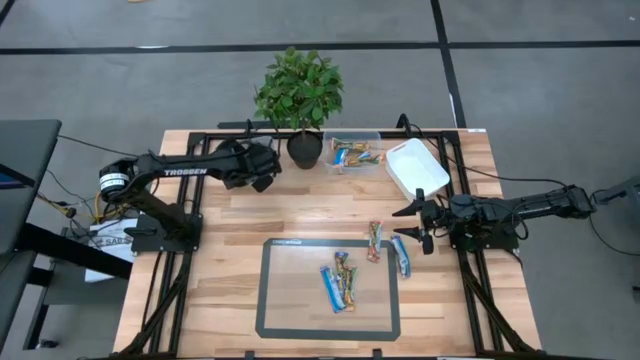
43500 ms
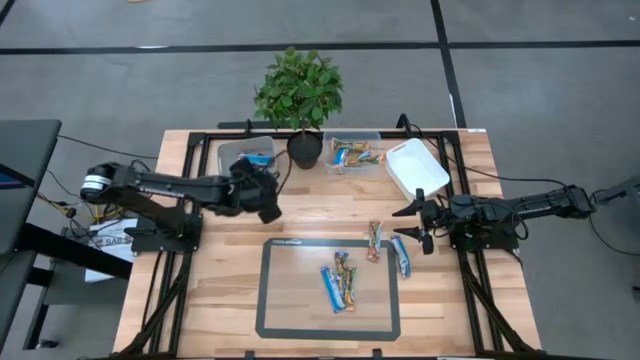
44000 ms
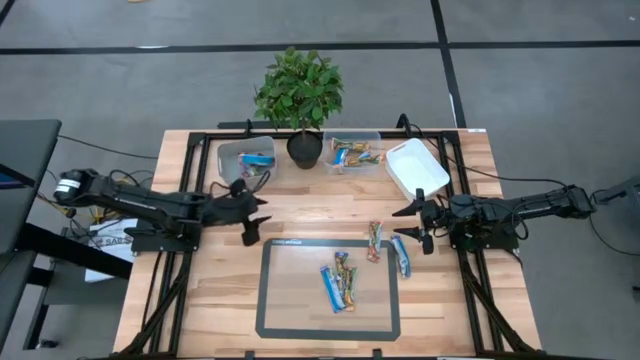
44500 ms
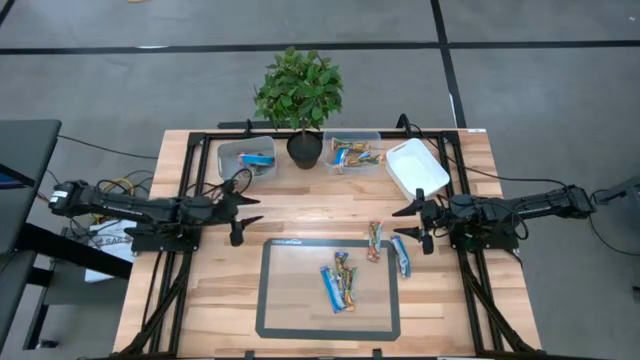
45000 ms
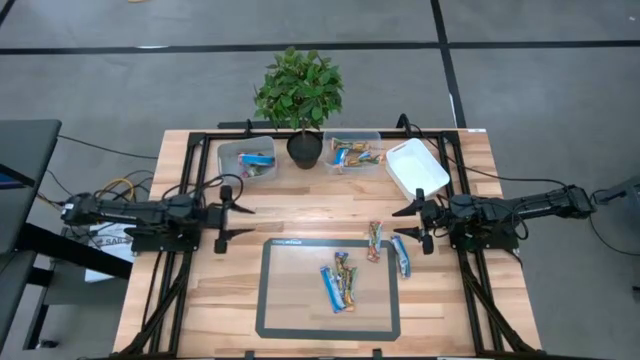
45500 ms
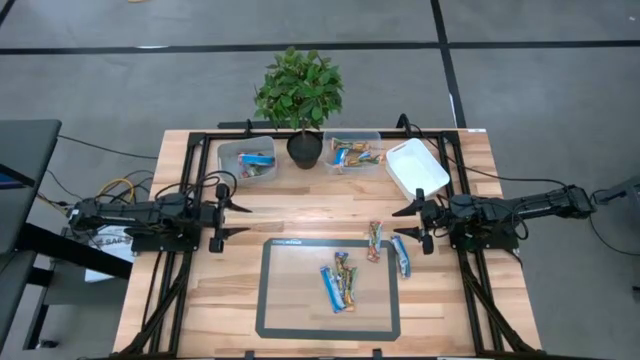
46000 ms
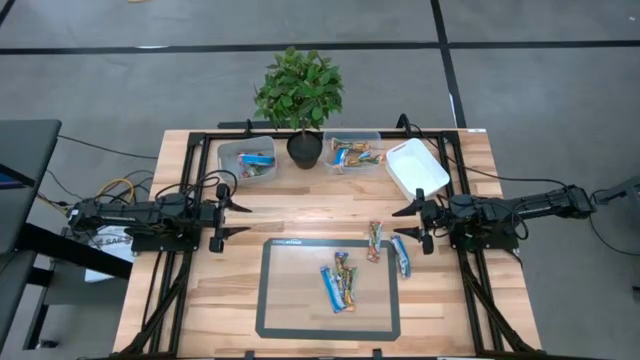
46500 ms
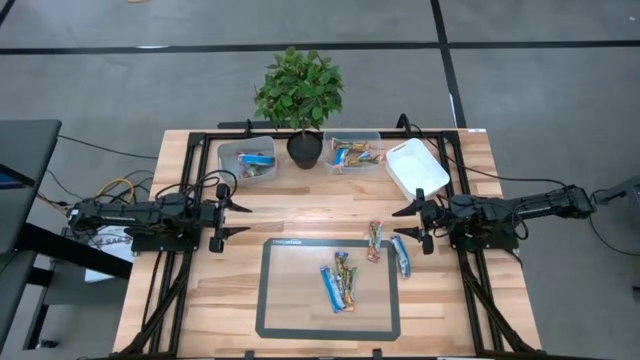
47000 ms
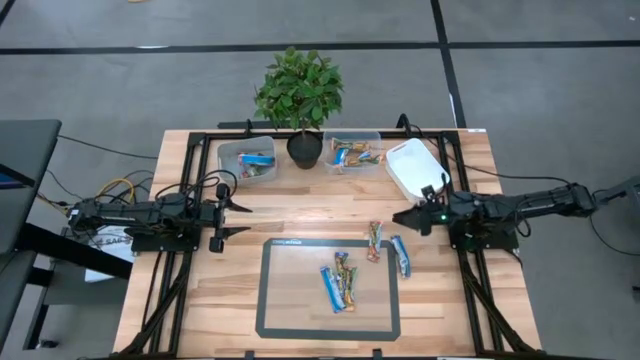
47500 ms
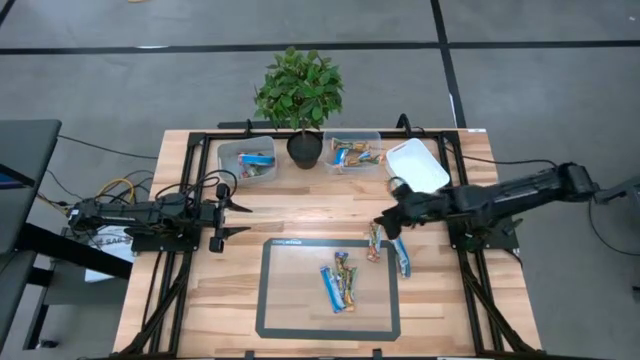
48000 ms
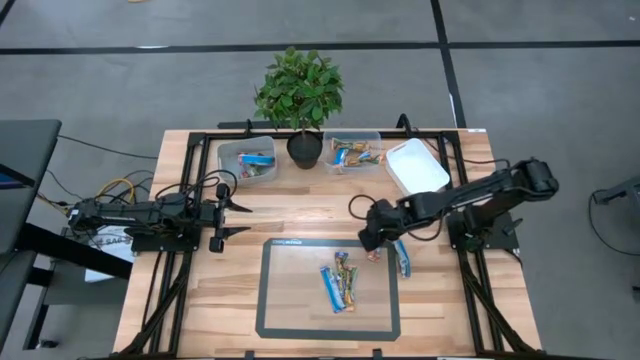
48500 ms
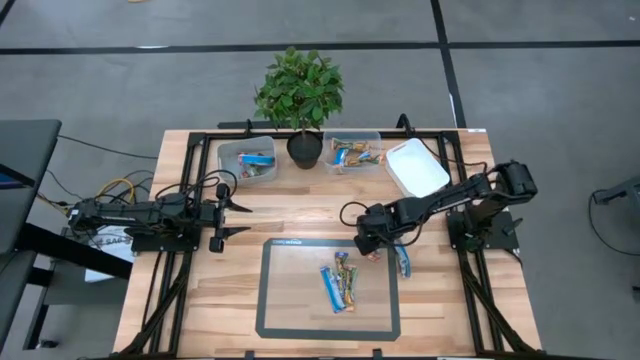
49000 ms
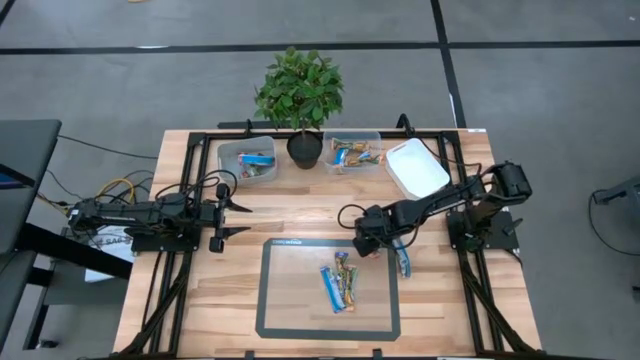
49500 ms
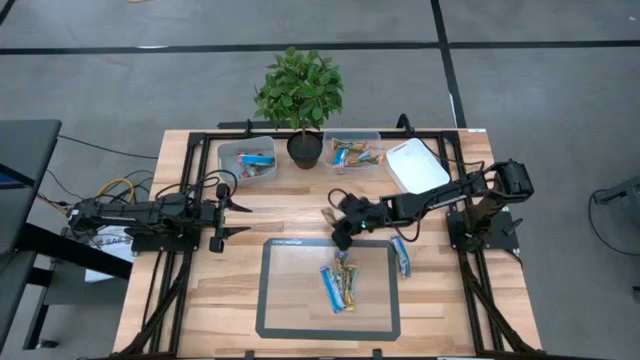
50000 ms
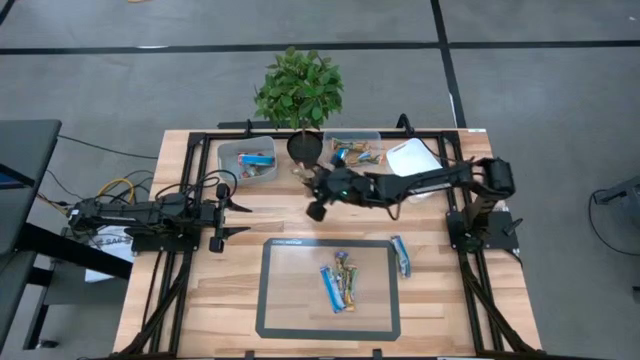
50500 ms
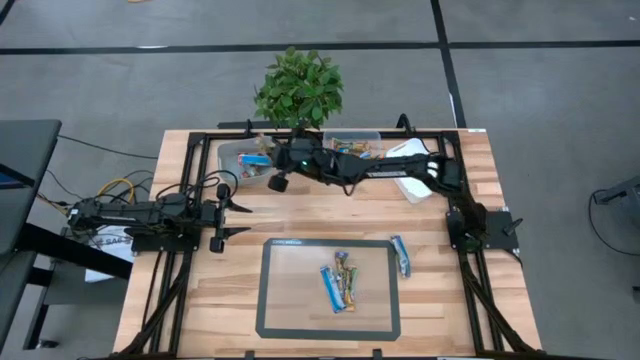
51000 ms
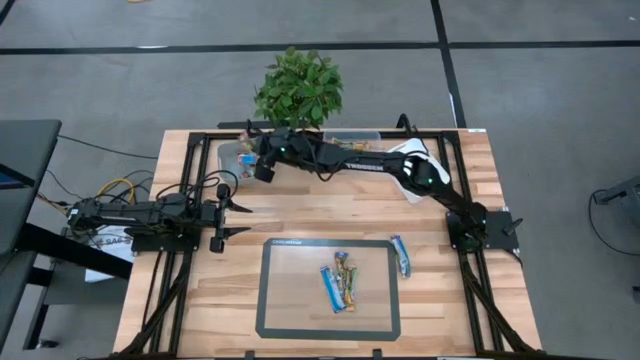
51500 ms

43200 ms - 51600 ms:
Task: Pick and place Granola Bars by type
Put the red granola bar into the gray bin

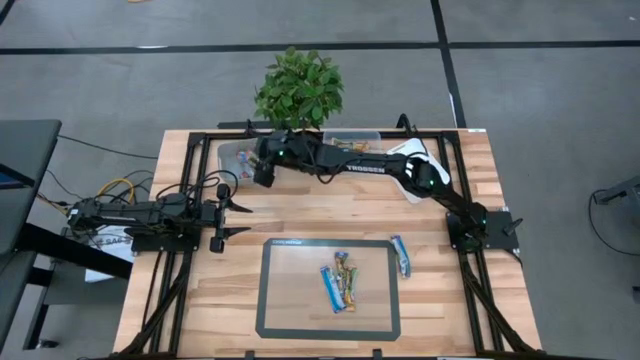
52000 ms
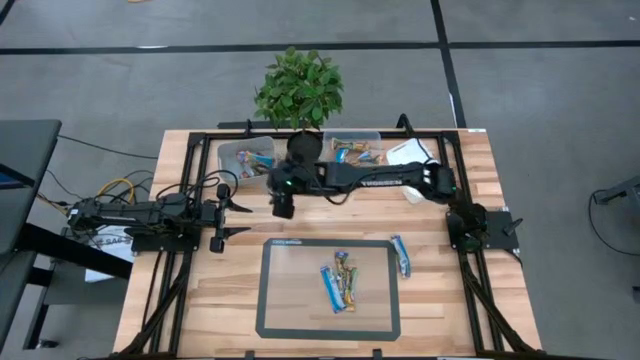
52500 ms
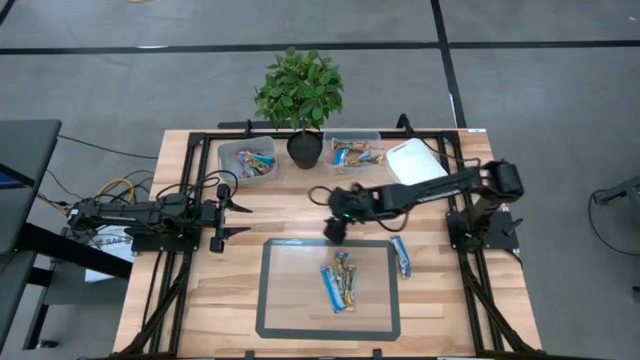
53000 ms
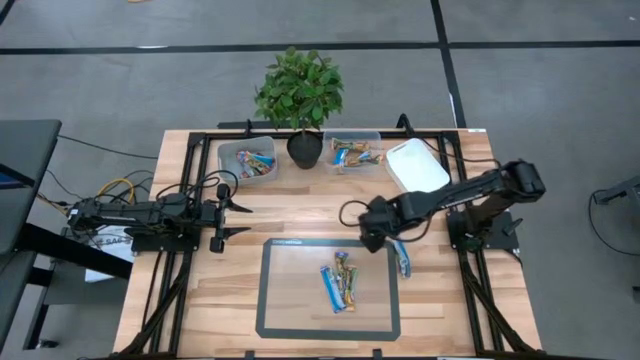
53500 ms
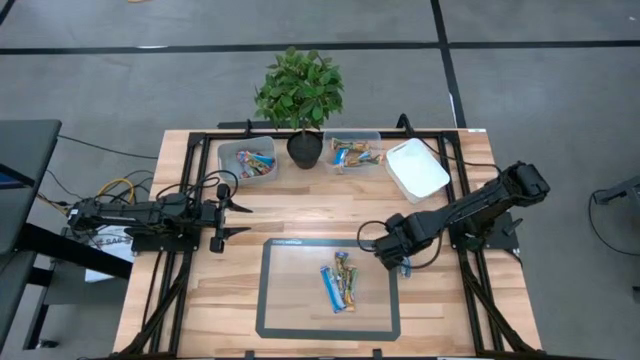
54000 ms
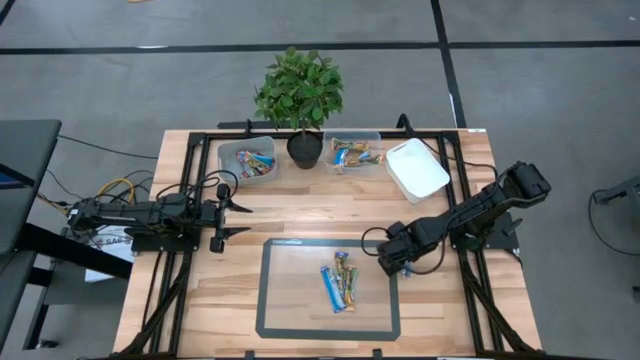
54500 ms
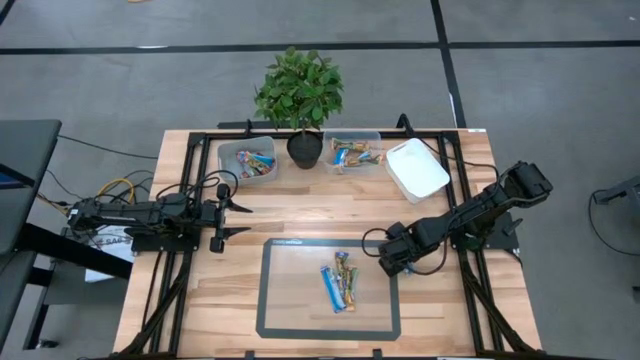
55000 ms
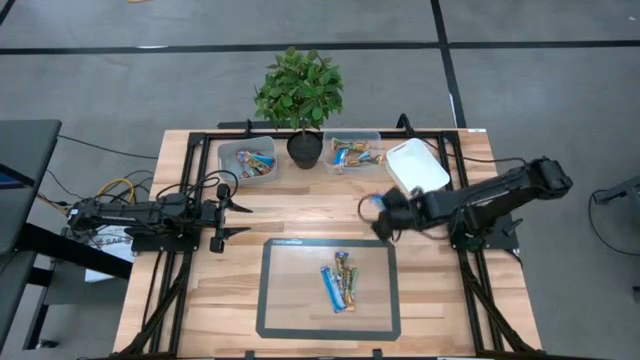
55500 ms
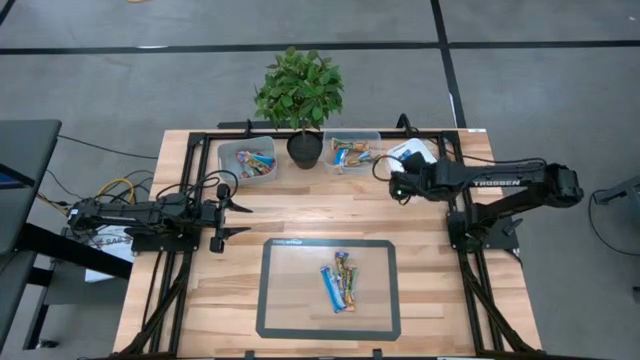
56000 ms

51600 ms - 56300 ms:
Put the blue granola bar into the white bin

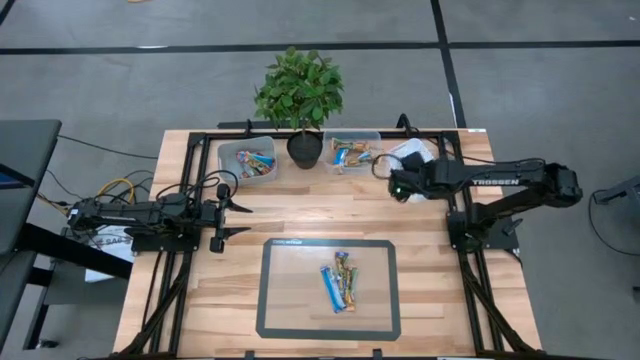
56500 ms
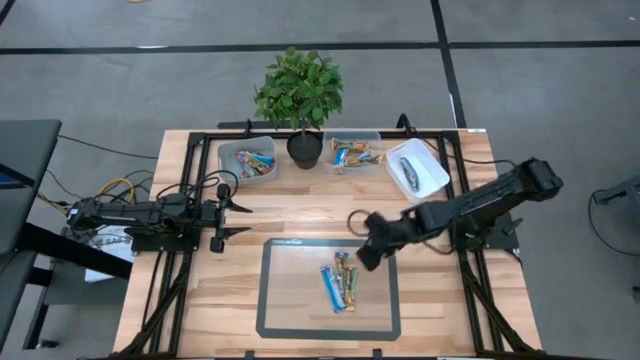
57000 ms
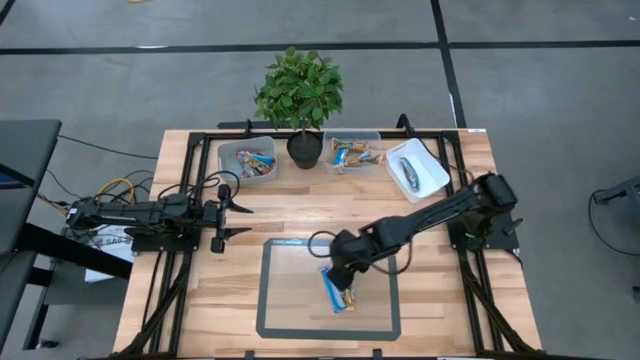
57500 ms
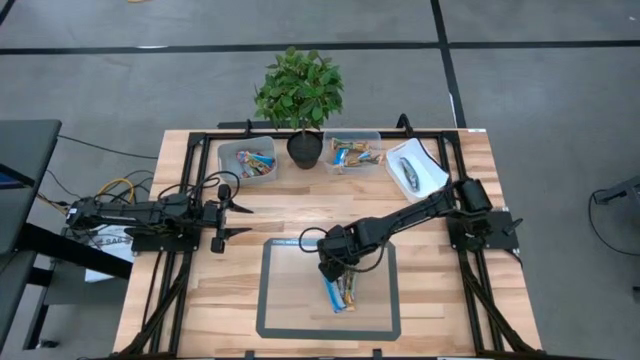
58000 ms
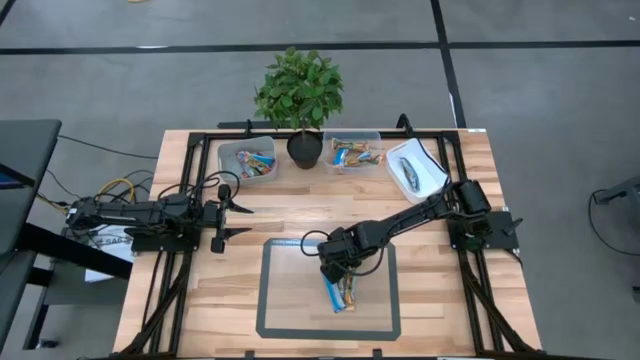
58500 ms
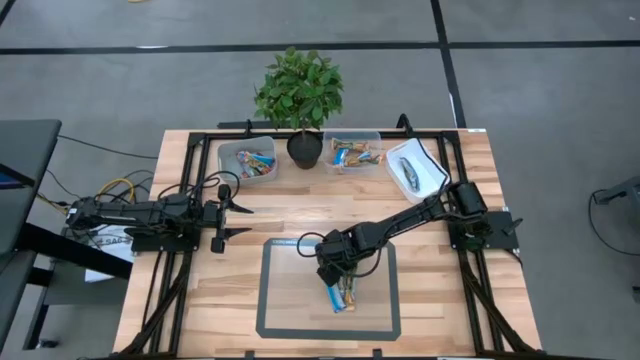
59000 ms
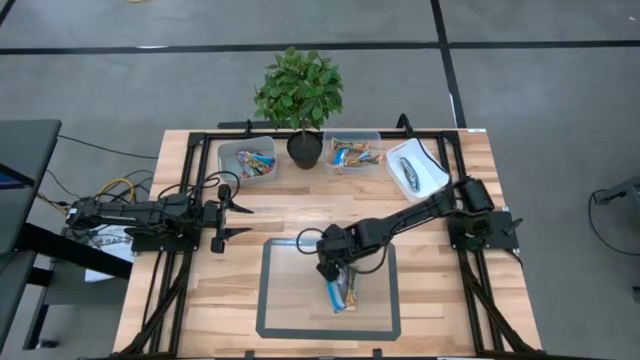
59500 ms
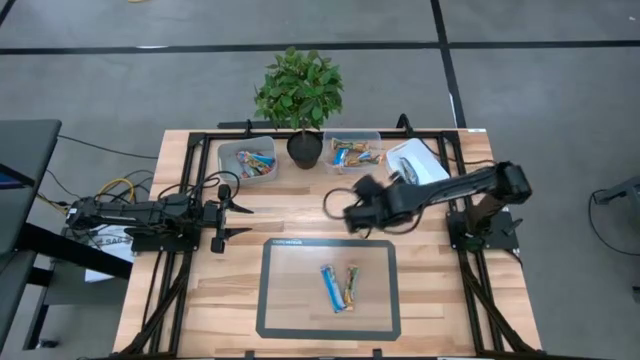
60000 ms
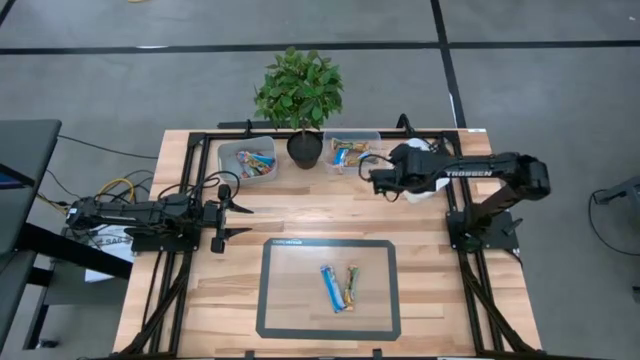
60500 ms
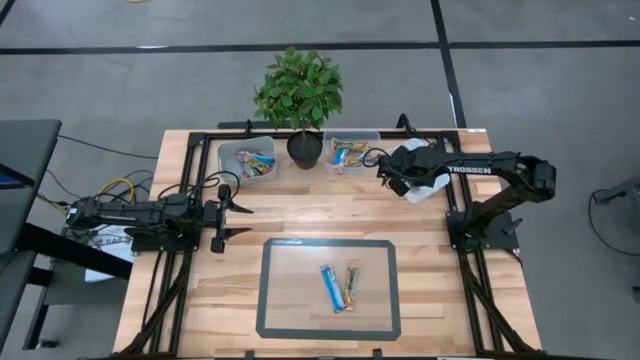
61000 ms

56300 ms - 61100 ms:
Put the blue granola bar into the white bin

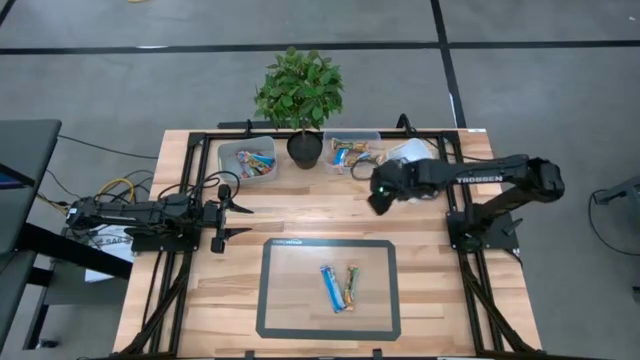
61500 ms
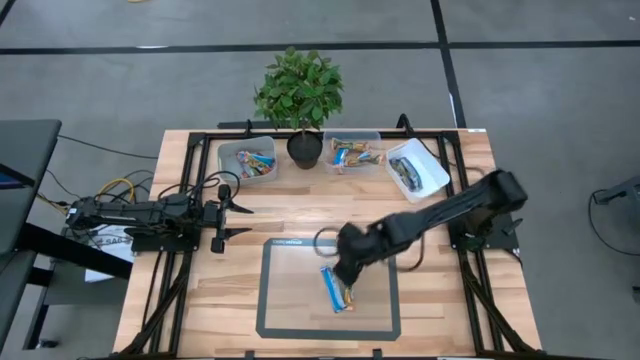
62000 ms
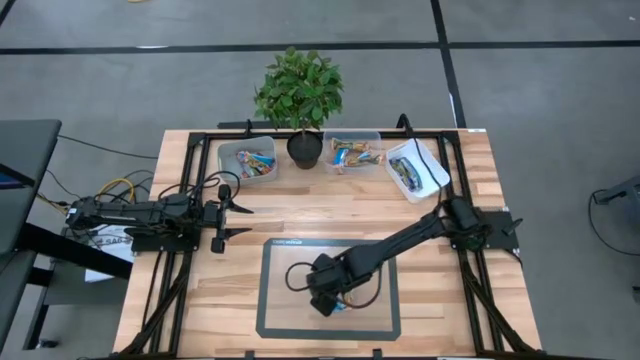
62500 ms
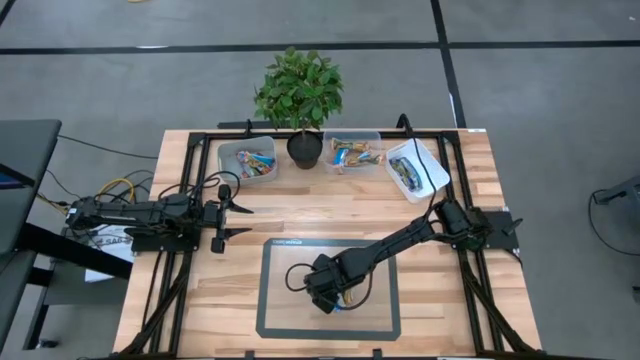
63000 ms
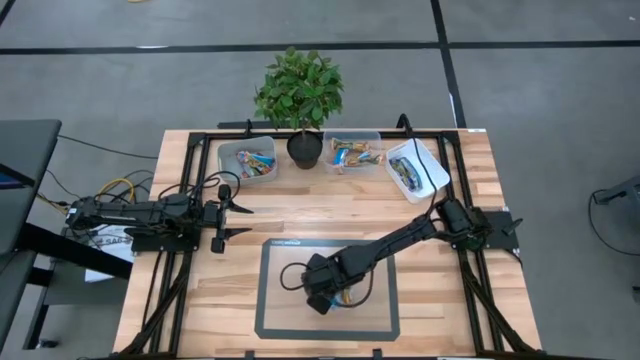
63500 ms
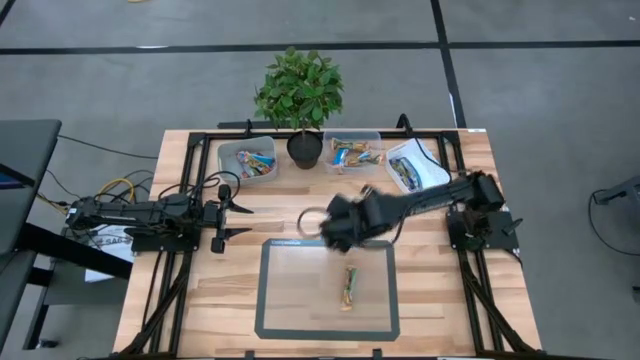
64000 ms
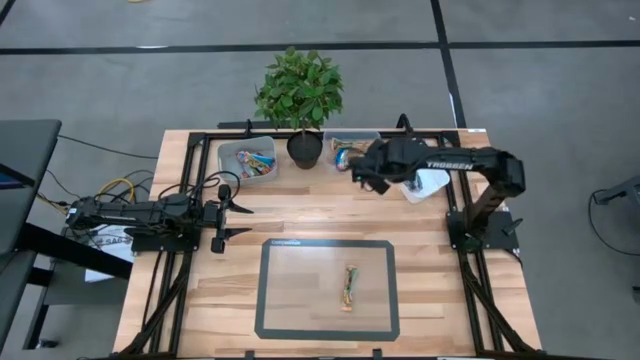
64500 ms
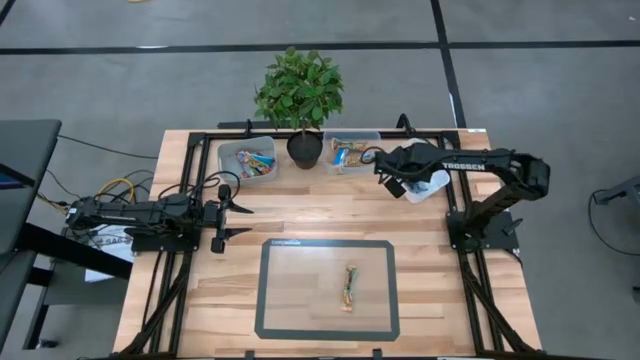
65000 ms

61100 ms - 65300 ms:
Put the blue granola bar into the white bin
